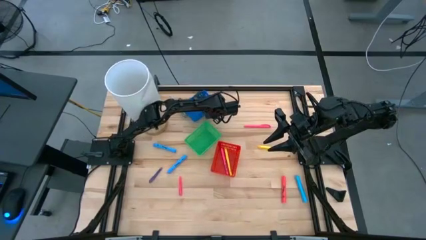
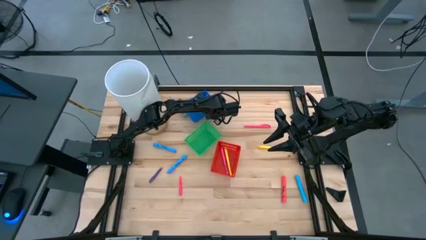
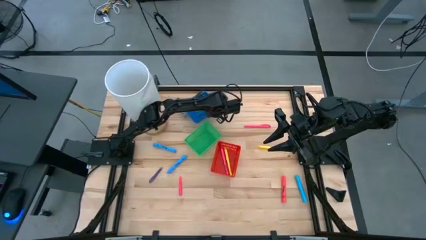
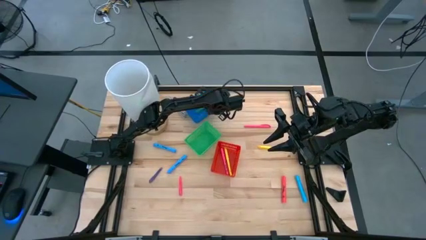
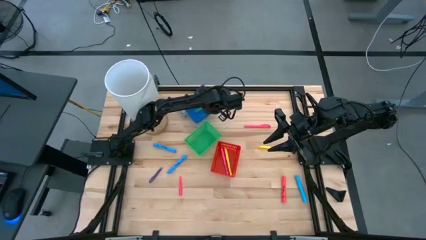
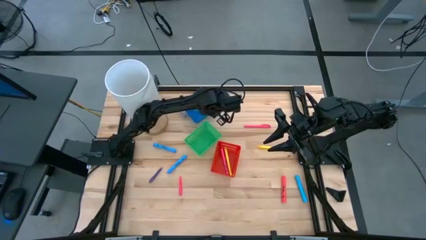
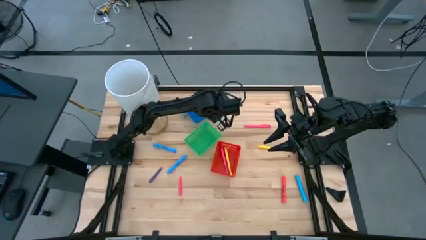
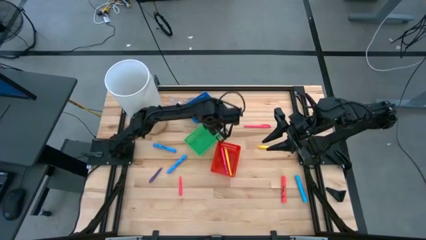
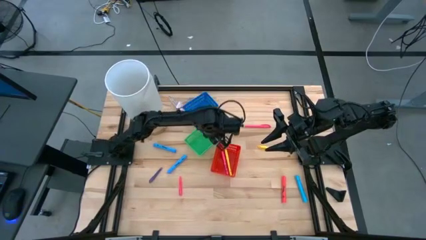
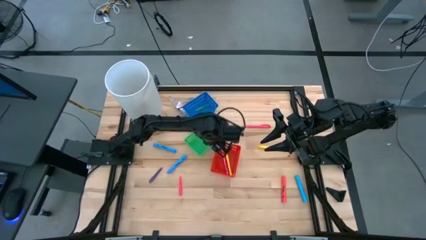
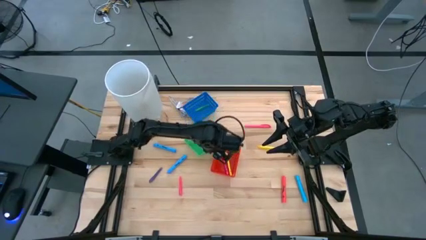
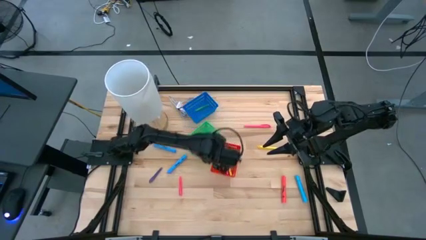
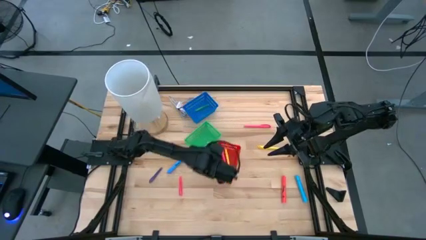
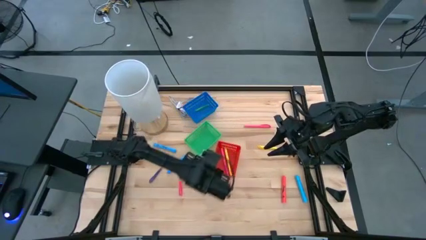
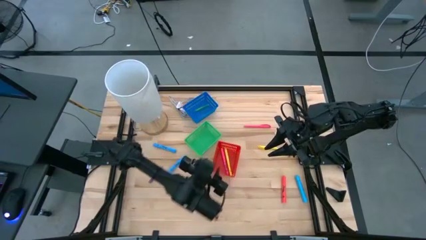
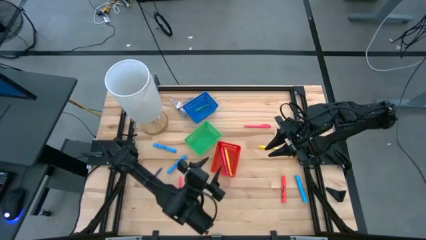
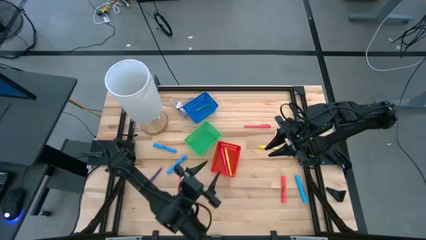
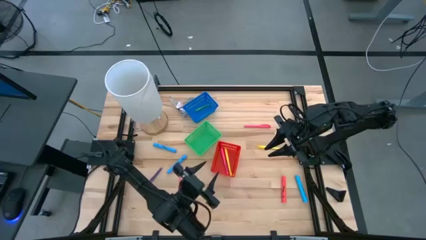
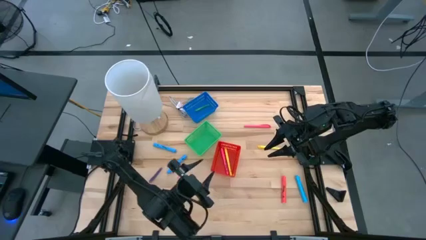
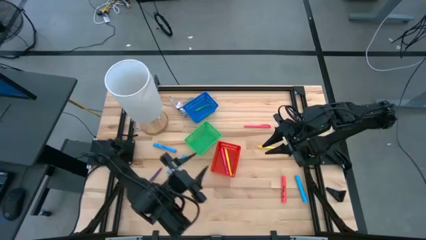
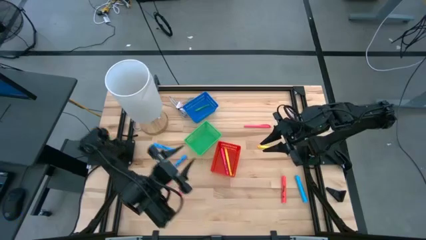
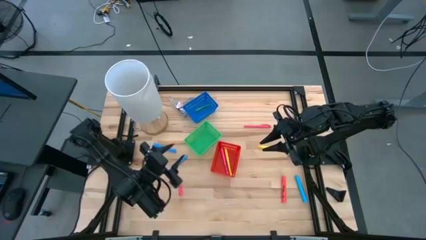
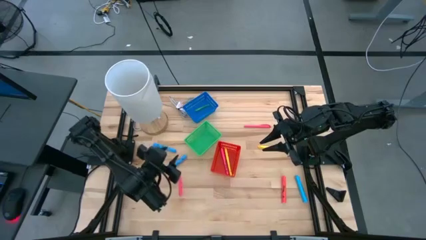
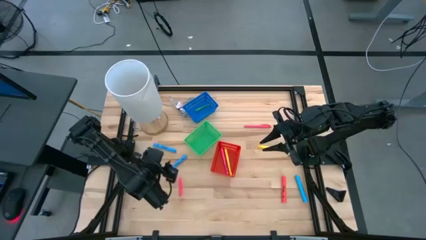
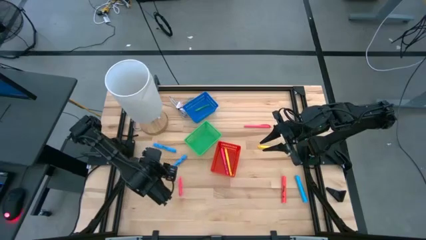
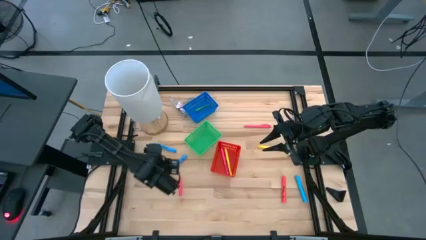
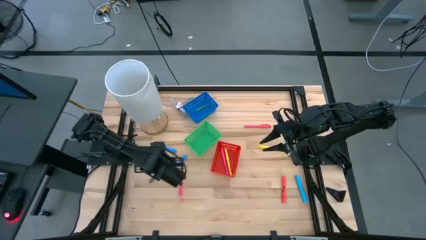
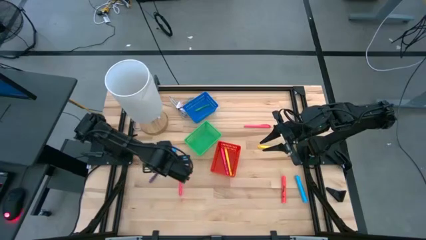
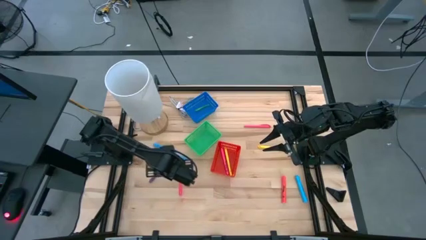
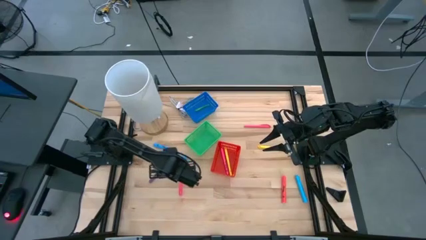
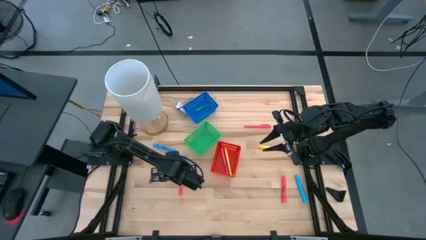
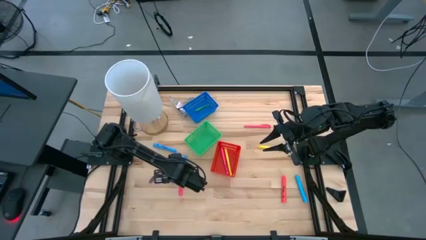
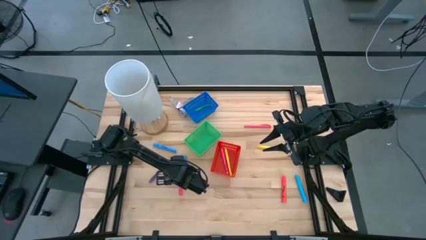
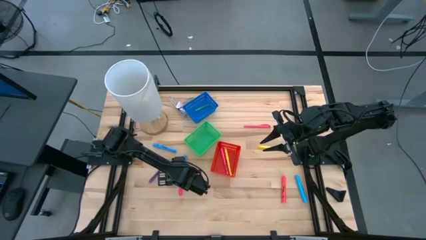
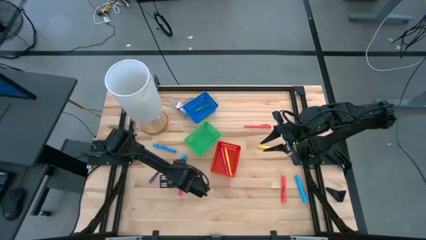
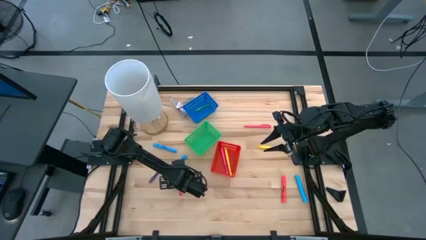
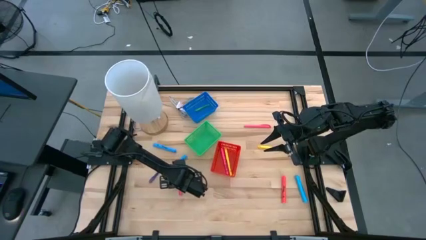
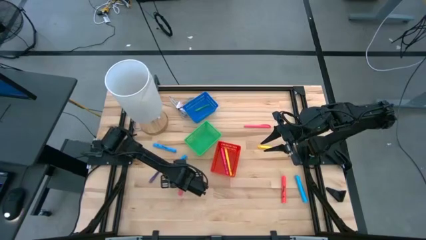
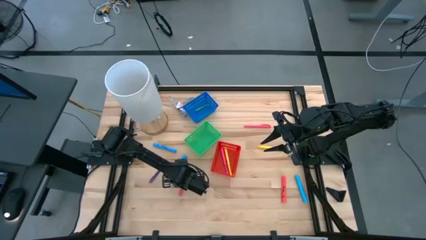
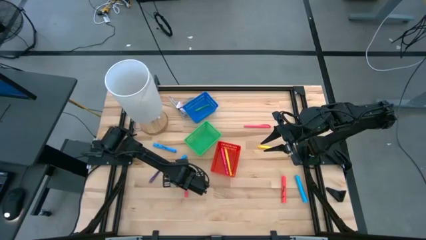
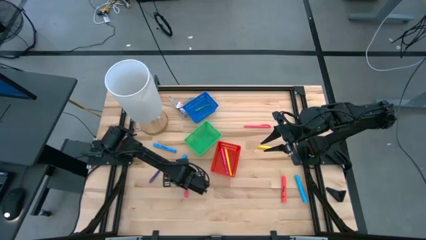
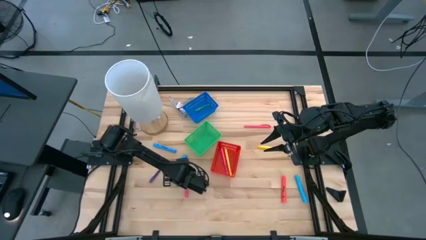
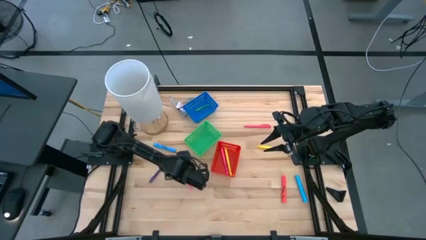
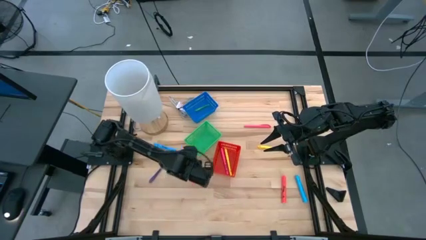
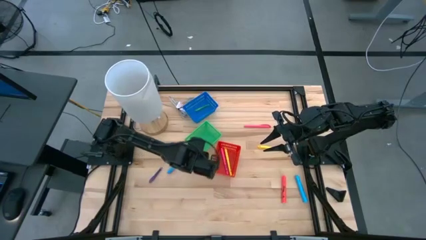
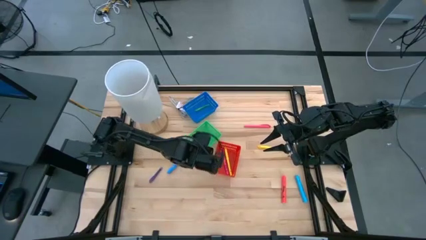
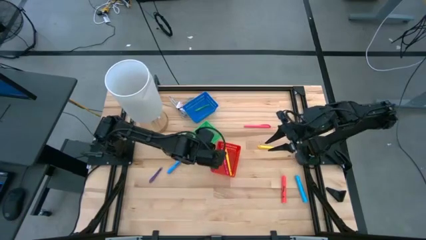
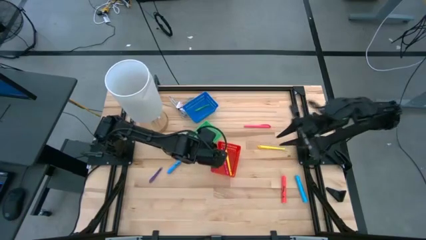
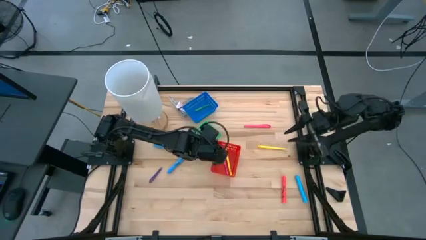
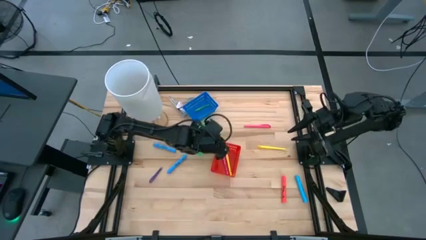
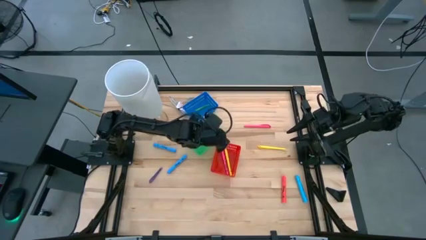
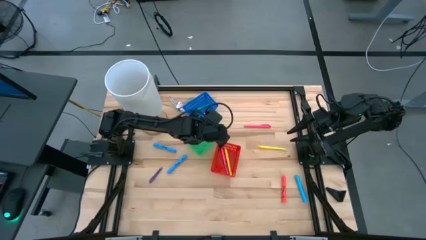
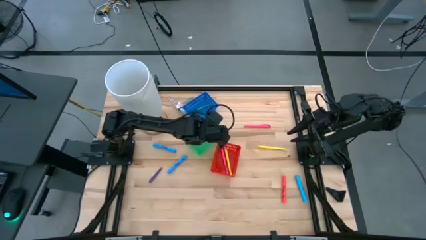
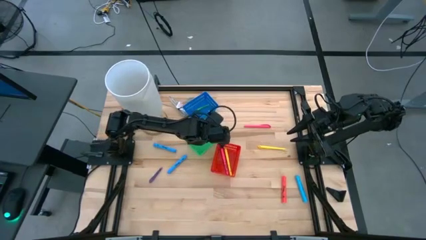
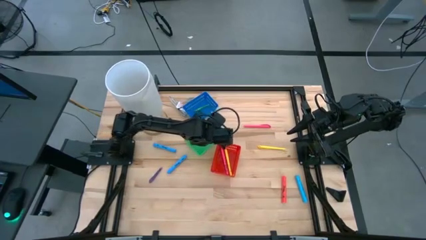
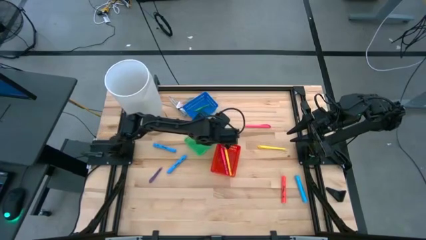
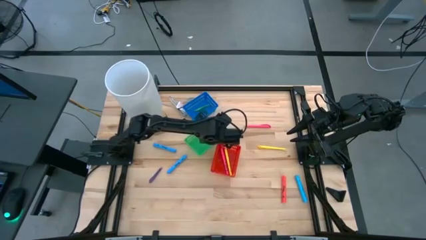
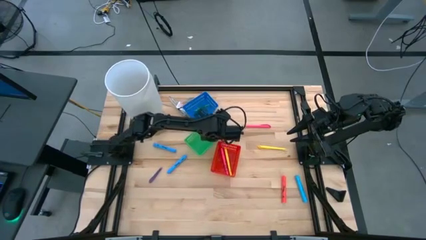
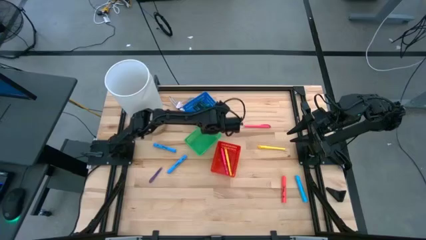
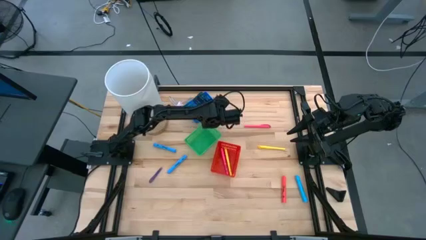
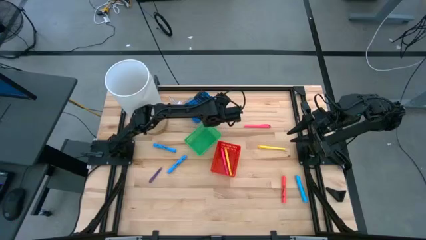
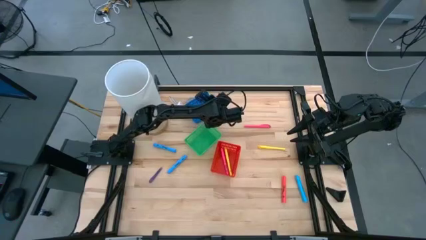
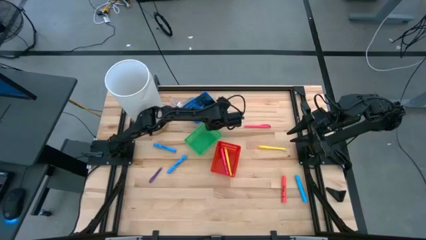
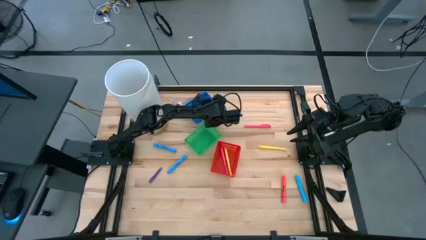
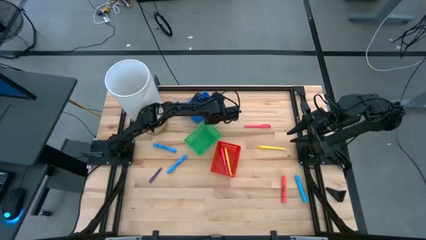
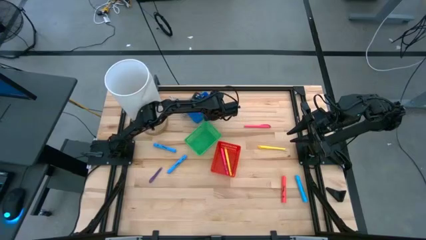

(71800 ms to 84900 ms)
Task: Pick & Place Markers
Put the small pink pen into the blue bin
